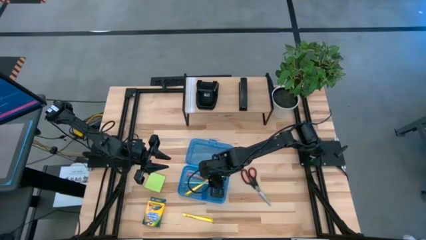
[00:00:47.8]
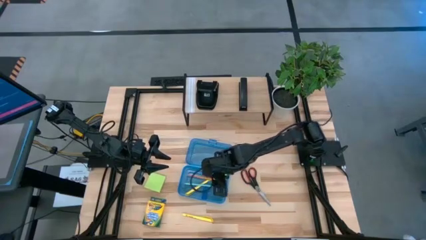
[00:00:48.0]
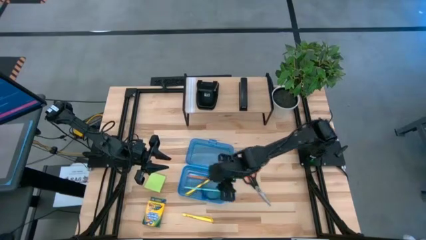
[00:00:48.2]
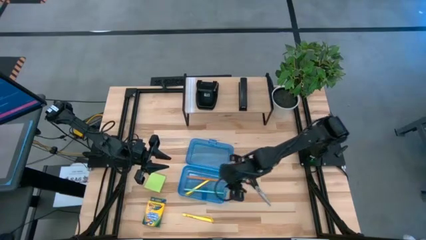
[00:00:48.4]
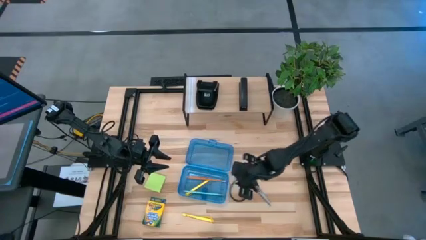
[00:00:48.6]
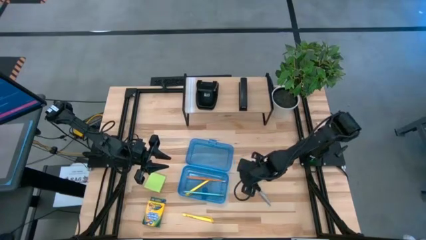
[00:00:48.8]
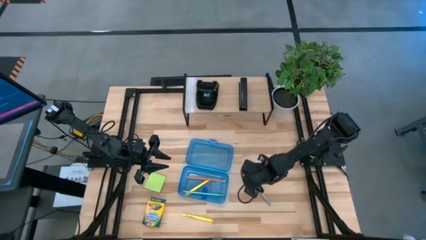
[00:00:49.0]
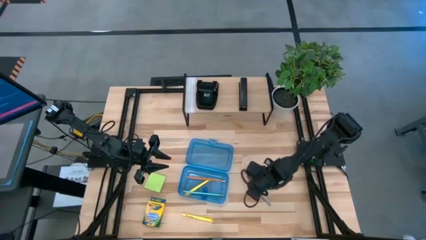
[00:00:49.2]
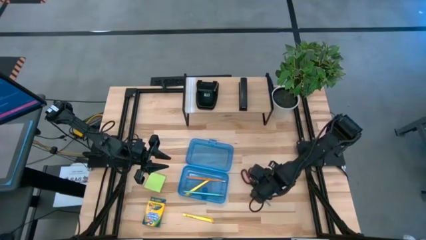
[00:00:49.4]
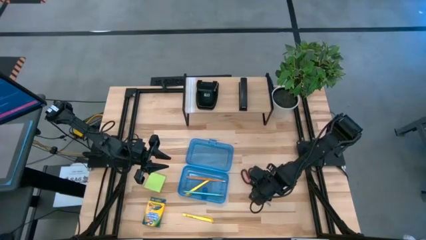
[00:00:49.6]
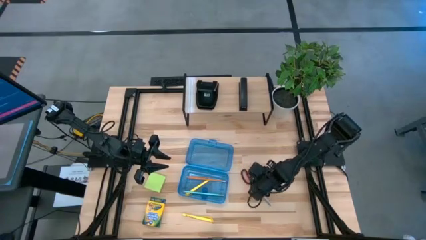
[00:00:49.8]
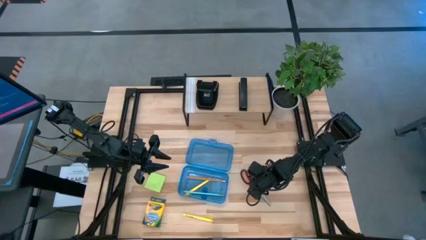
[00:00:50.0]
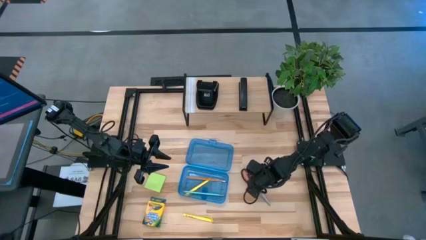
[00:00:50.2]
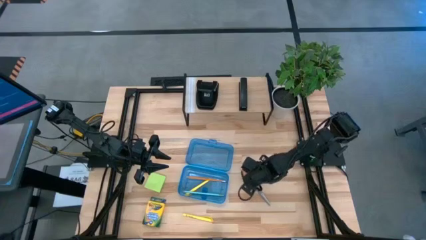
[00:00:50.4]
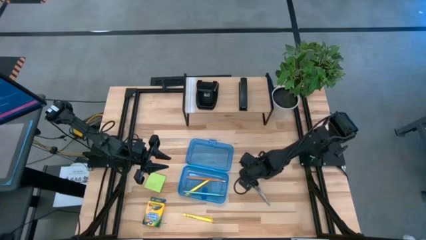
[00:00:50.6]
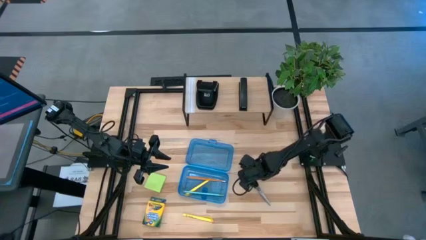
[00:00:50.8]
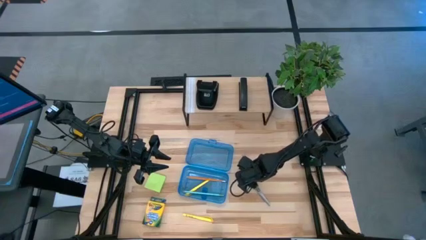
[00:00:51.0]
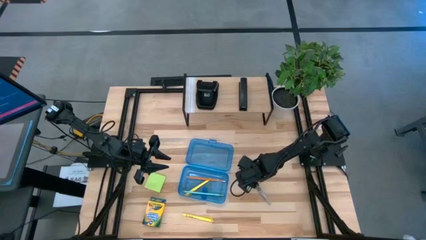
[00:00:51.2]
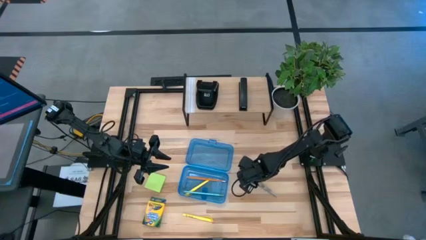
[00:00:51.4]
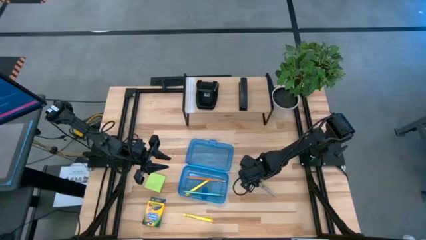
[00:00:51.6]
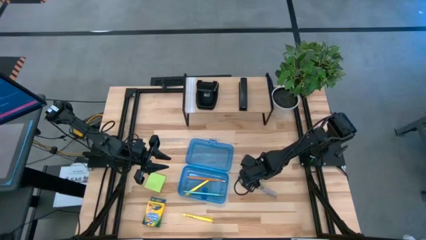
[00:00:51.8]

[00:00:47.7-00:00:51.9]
Task: Pack school essentials
Put the black scissors into the blue supply box

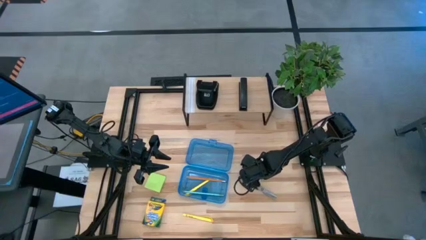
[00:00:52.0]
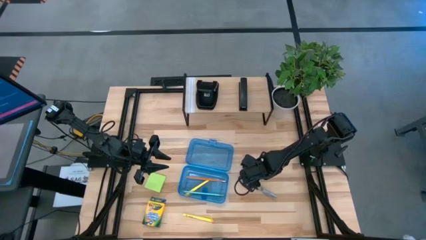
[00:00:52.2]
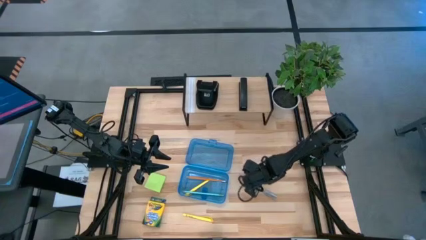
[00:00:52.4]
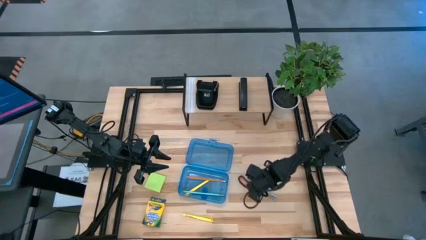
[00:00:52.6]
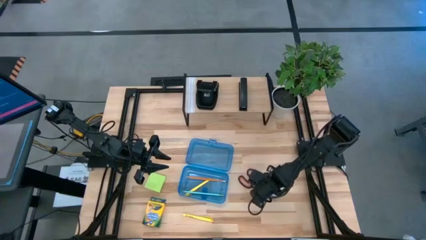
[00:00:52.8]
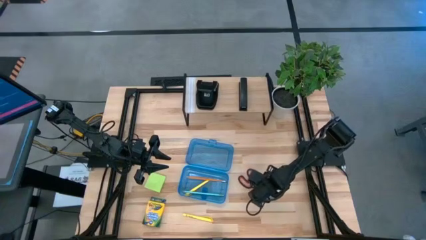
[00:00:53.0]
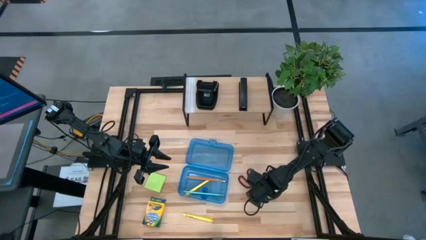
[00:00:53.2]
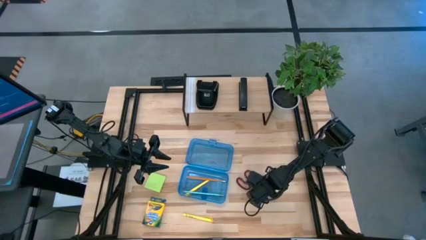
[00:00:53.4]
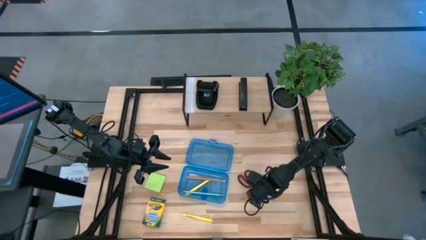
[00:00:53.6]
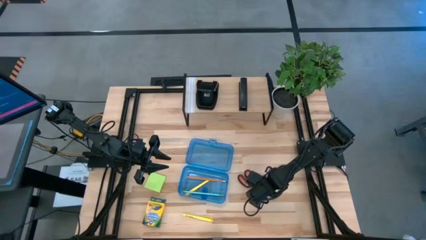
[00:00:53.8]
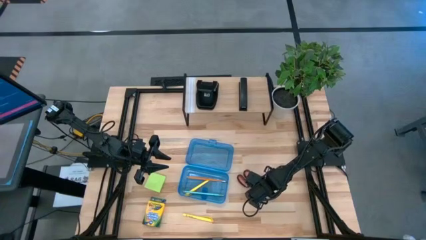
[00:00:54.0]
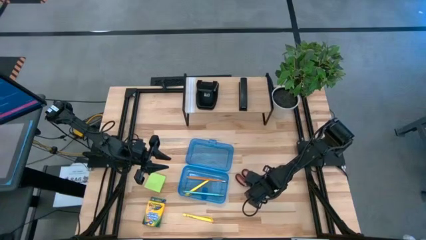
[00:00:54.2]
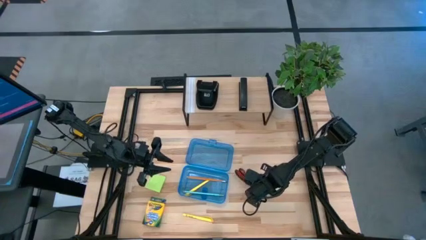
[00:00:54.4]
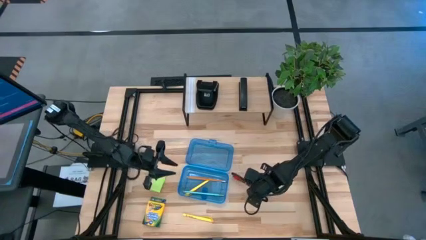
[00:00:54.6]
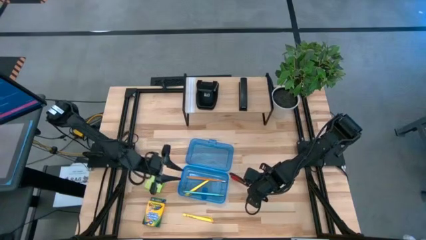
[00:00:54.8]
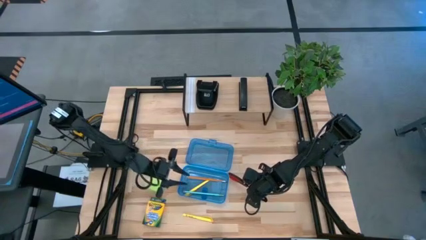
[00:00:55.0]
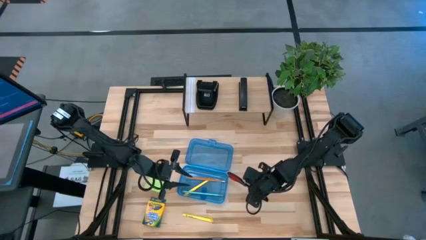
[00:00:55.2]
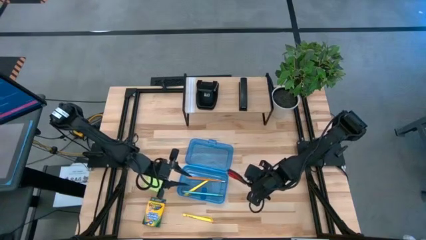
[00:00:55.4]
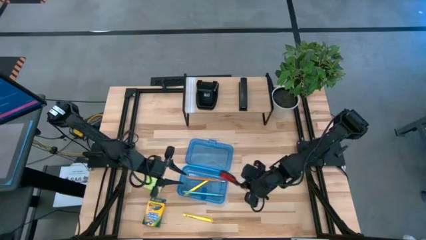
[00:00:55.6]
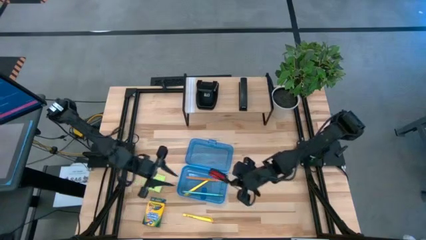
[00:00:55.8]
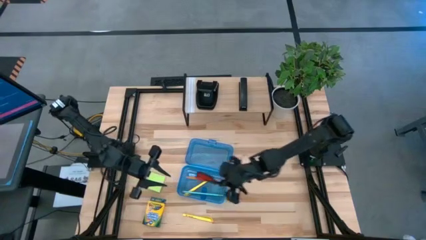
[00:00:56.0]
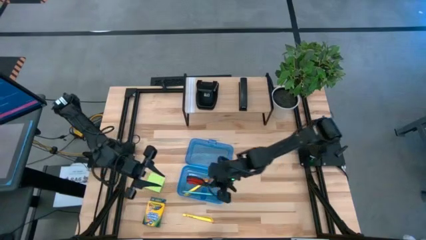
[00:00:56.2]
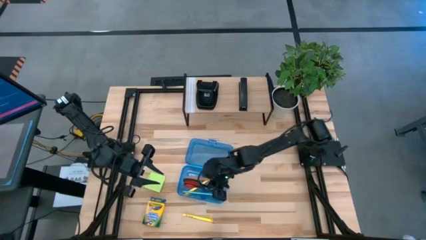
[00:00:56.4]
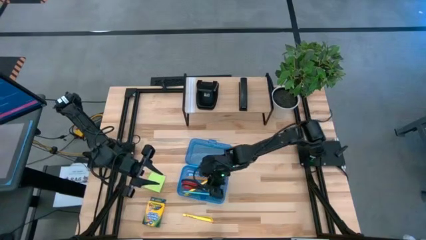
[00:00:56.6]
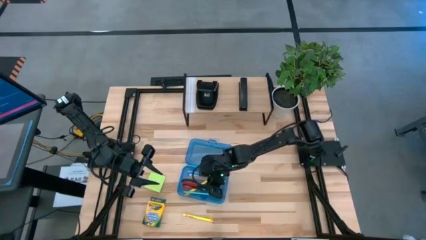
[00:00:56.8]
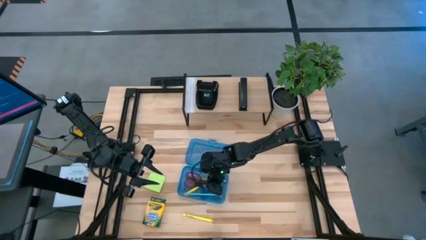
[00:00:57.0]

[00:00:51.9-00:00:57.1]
Put the black scissors into the blue supply box

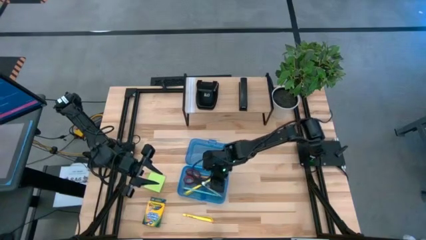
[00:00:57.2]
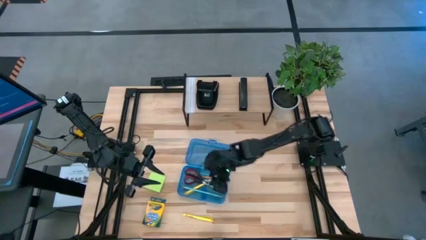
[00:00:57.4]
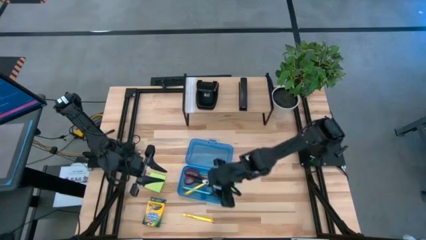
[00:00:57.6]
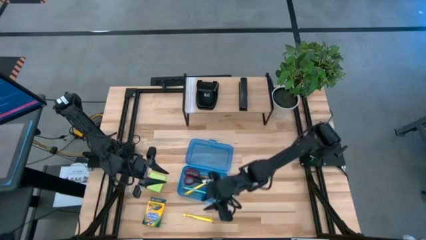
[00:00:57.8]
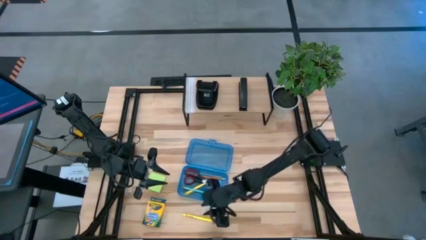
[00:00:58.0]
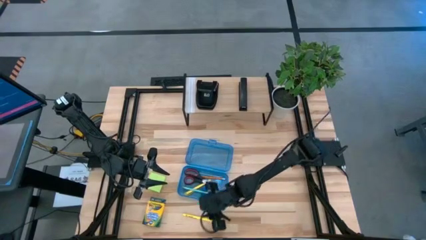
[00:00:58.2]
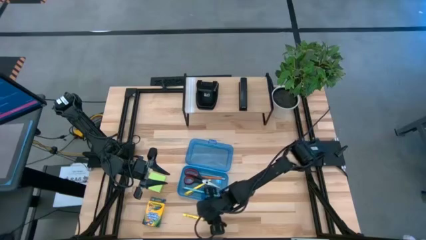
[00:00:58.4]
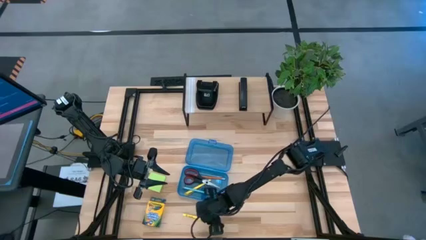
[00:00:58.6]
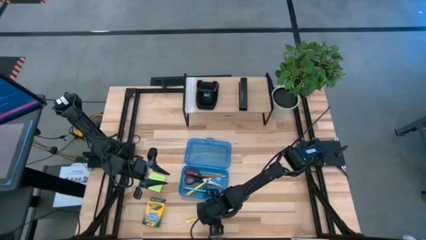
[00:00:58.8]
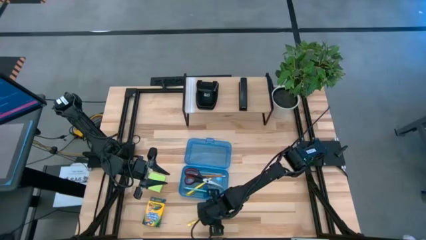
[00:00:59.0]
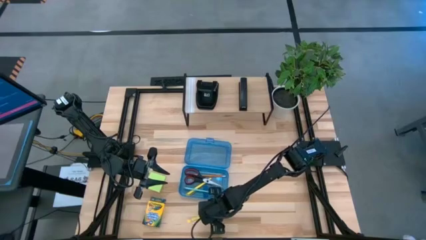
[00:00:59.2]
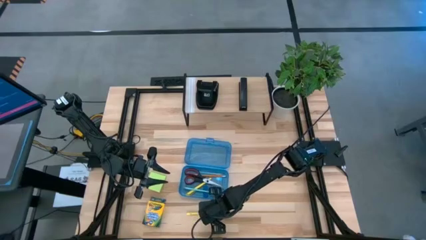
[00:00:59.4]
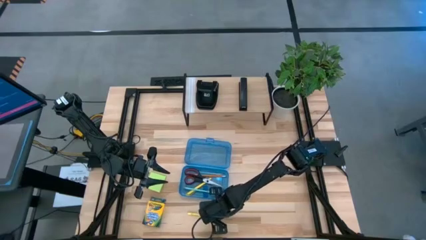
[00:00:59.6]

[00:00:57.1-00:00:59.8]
Put the yellow pen into the blue supply box

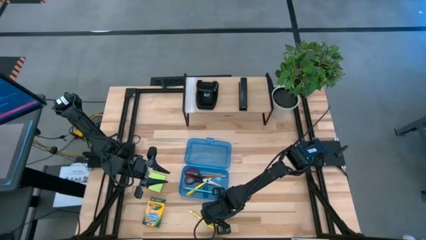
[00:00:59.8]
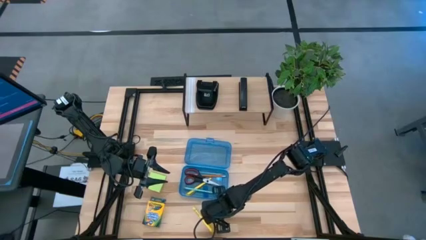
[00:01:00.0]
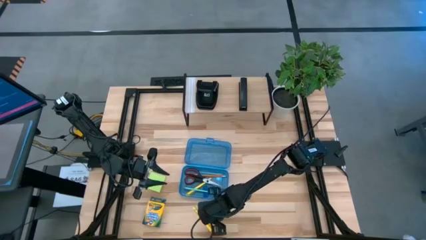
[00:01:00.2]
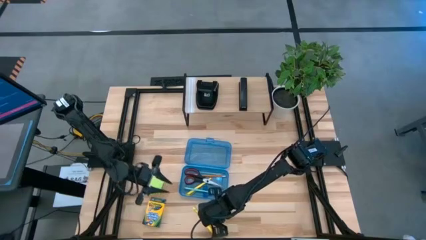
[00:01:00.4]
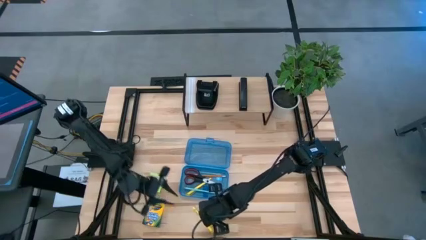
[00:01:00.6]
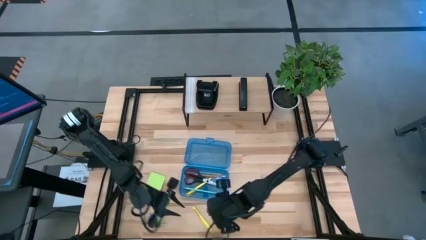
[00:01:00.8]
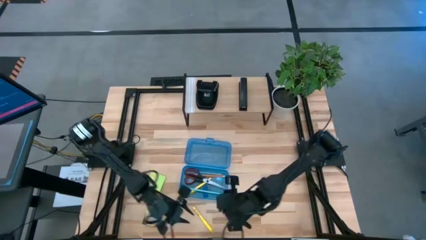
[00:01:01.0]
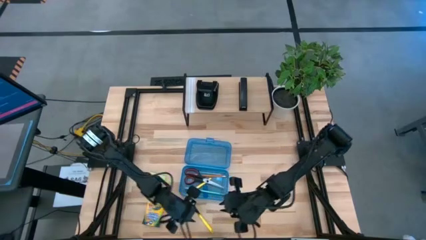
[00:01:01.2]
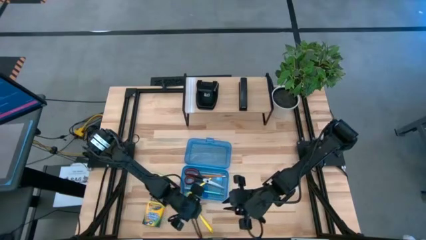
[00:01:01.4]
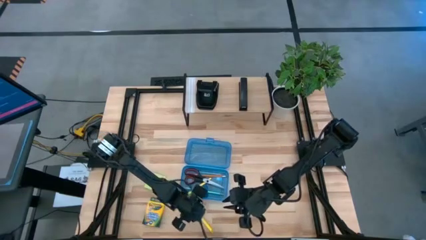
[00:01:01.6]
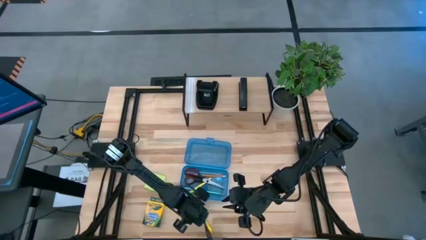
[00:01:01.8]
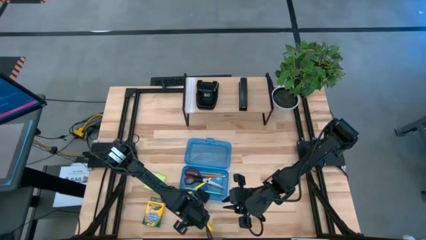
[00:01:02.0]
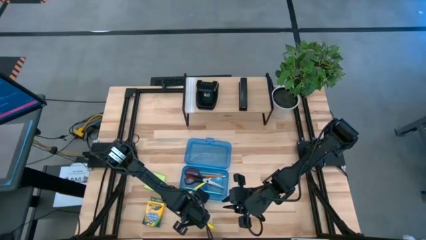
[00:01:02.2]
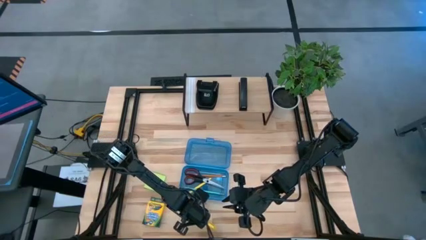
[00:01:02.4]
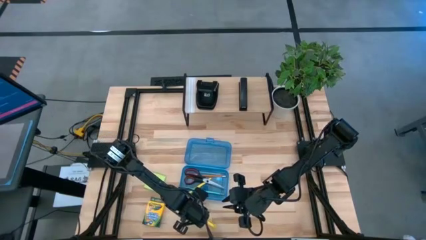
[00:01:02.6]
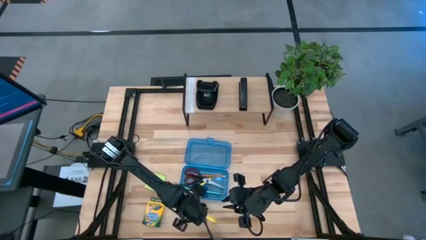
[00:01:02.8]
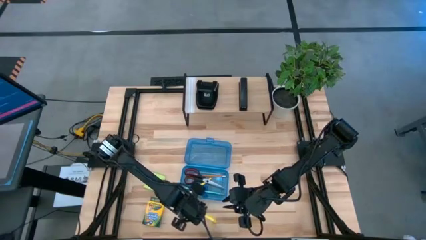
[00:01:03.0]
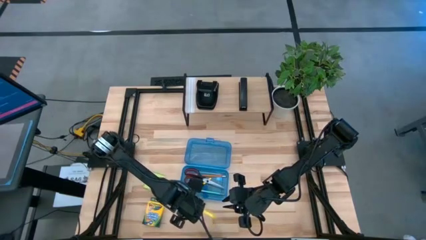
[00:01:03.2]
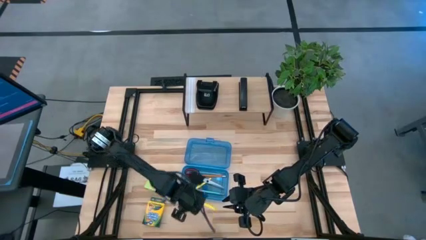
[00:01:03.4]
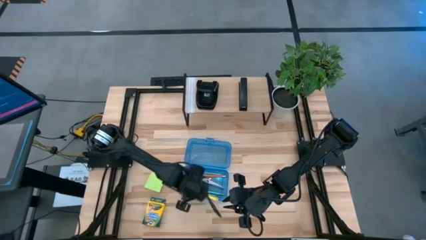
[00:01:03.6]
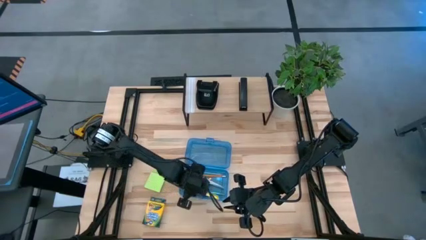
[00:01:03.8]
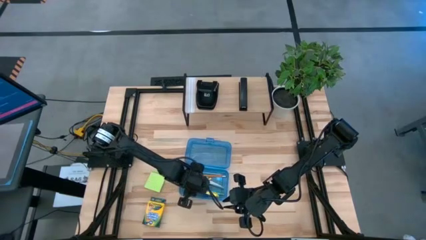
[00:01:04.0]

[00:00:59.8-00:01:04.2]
Put the yellow pen into the blue supply box
